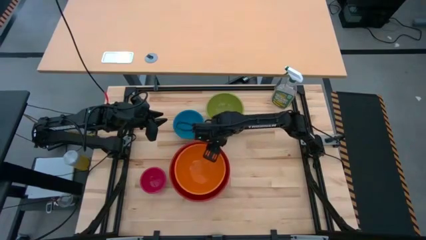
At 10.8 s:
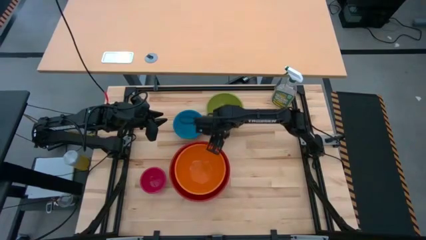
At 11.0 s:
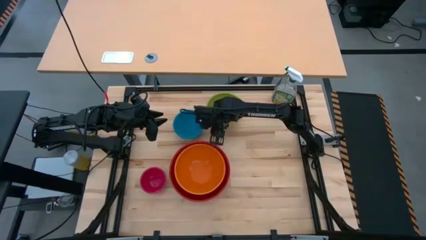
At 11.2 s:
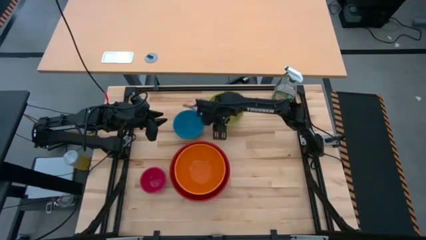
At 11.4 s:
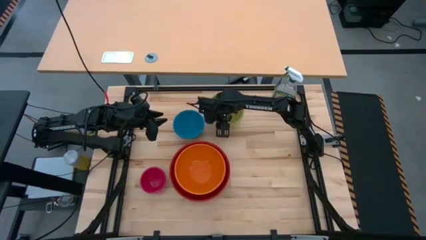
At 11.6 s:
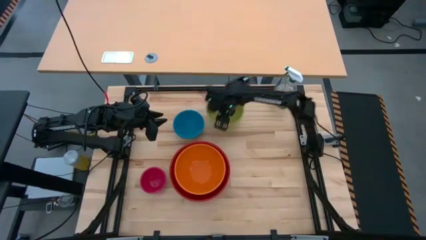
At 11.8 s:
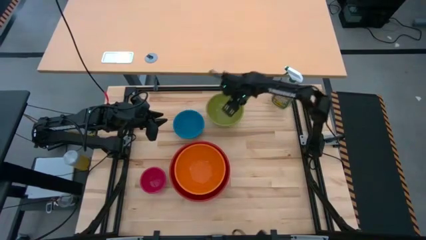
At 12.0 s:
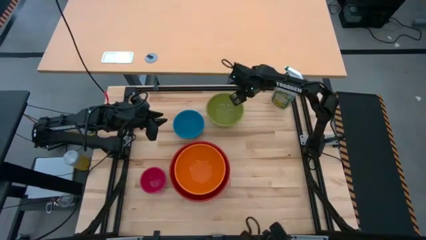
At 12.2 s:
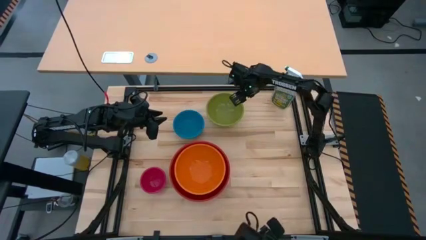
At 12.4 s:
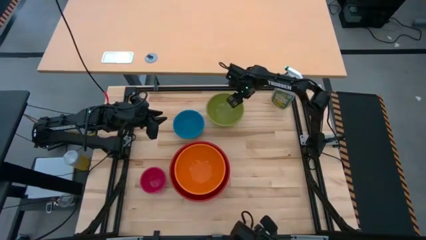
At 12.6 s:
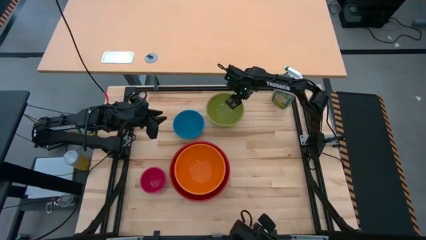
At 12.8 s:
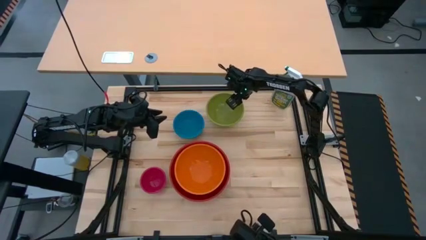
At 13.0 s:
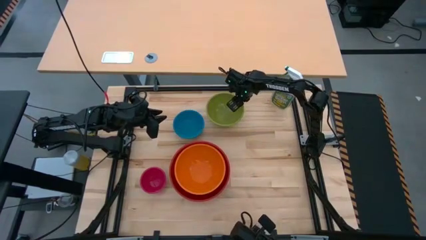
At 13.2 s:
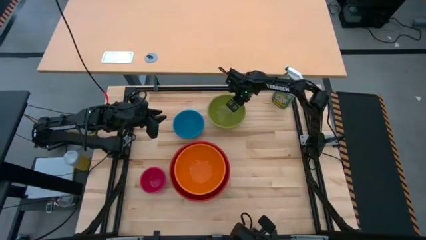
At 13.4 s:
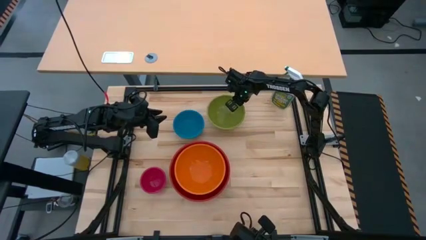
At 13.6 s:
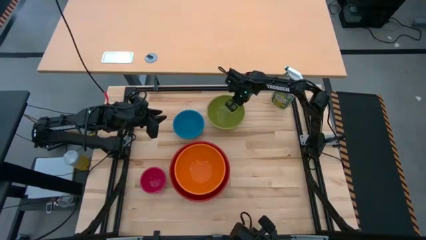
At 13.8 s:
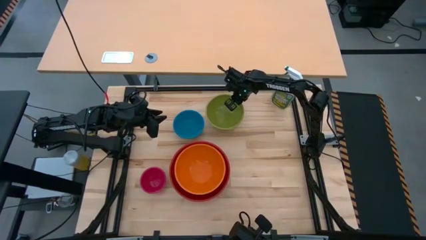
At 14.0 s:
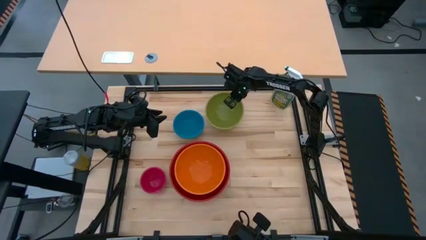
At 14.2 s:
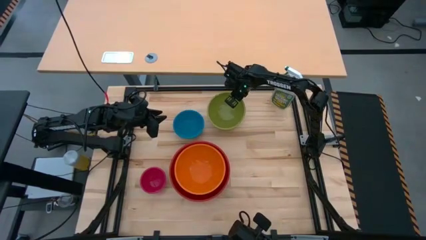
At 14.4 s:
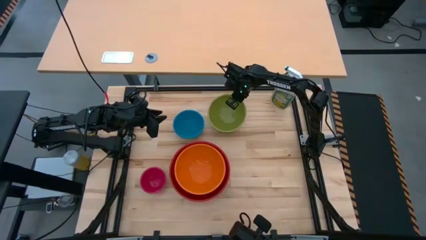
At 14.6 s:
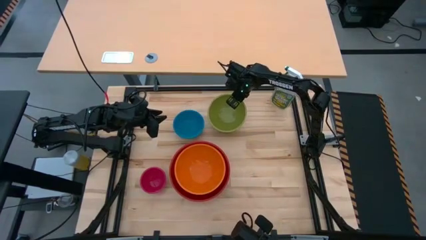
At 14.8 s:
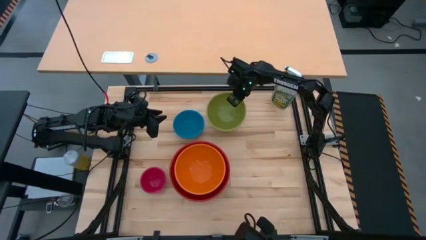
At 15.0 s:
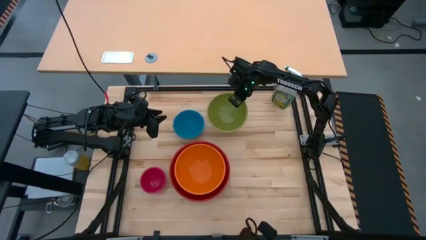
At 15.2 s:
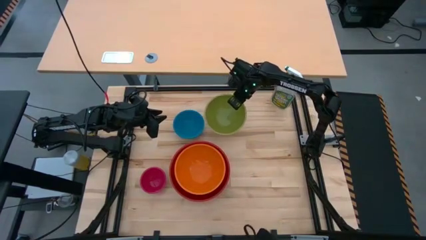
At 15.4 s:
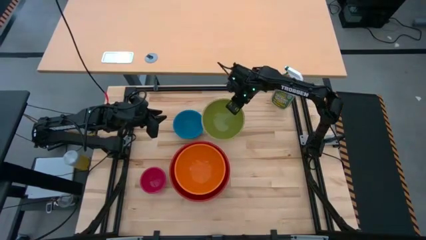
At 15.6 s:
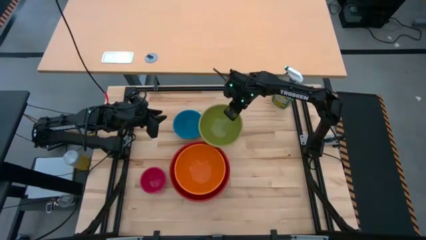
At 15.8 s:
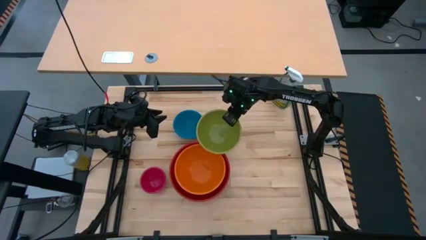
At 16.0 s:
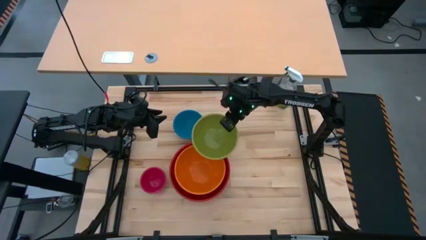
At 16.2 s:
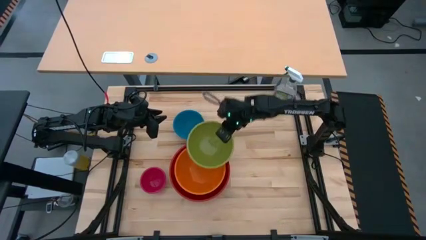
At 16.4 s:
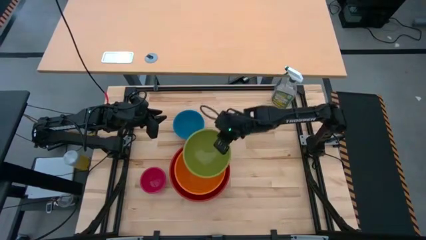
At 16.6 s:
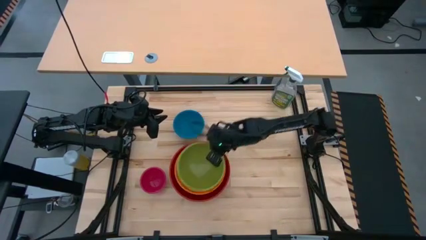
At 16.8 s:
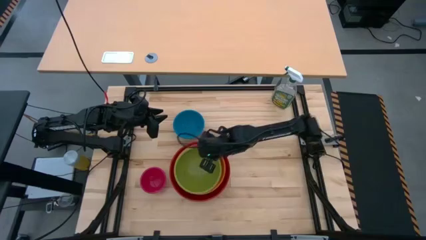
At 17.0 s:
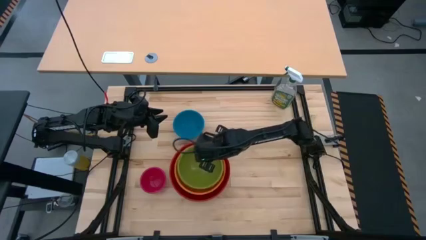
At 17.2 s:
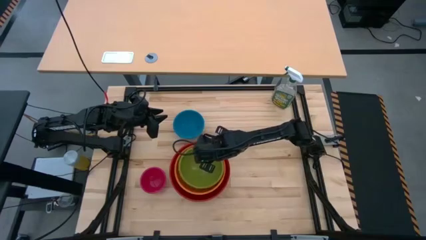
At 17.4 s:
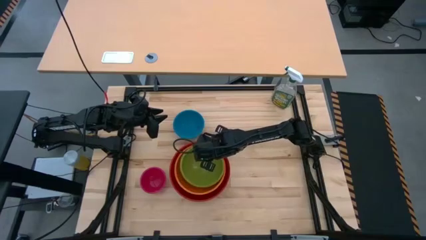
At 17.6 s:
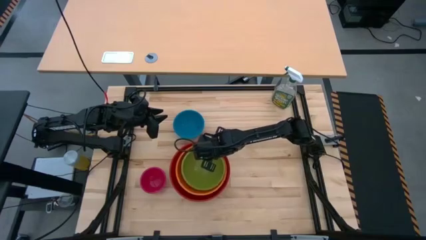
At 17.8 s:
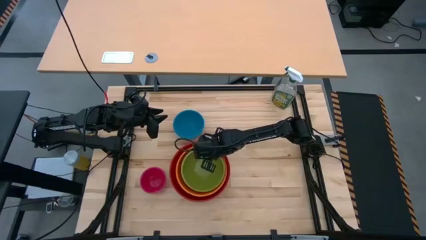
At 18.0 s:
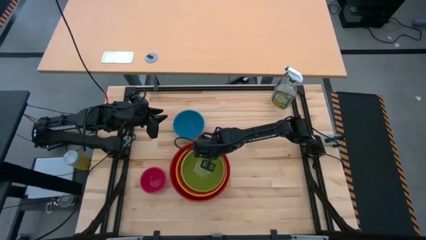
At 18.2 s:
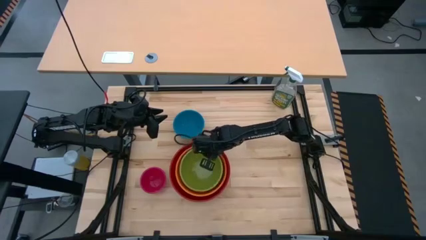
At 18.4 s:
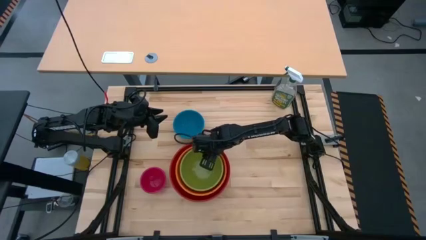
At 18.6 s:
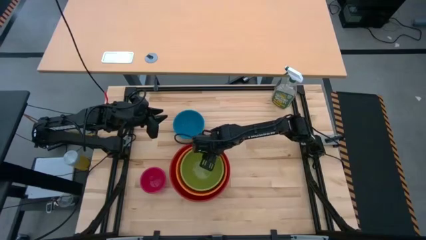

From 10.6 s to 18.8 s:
Stack the green bowl on top of the orange bowl

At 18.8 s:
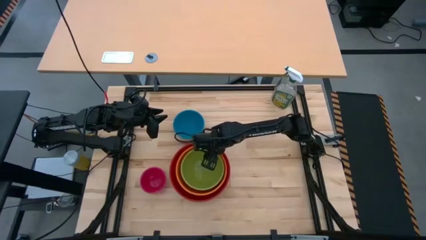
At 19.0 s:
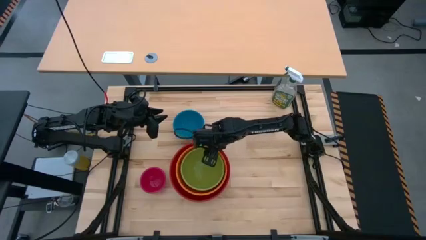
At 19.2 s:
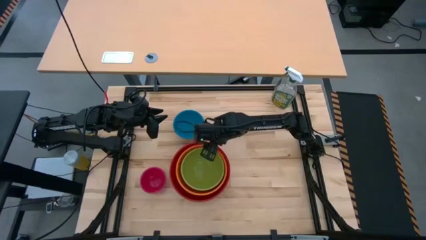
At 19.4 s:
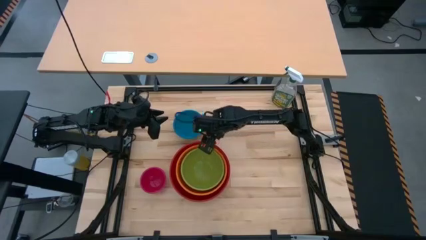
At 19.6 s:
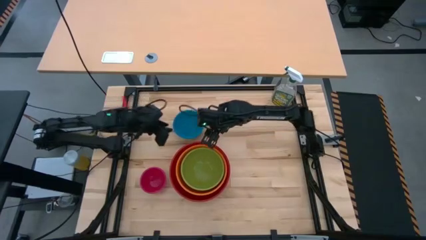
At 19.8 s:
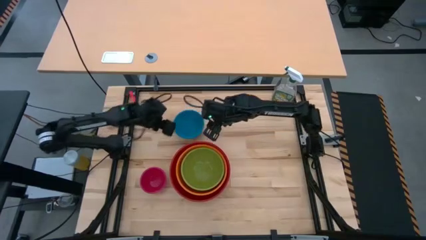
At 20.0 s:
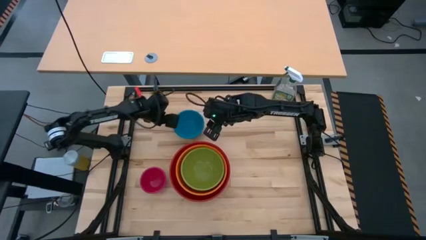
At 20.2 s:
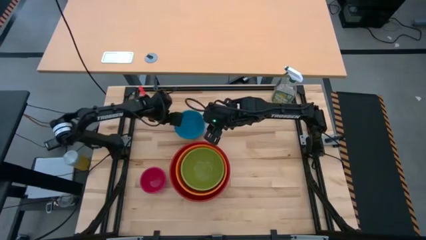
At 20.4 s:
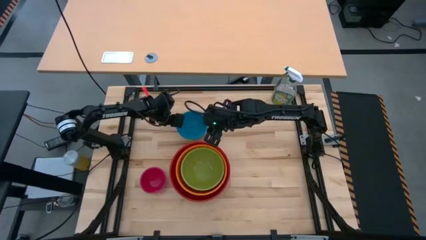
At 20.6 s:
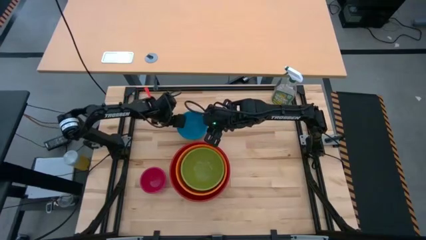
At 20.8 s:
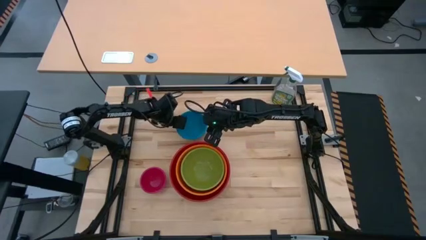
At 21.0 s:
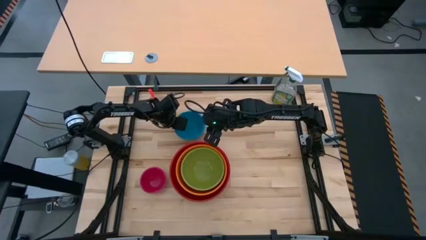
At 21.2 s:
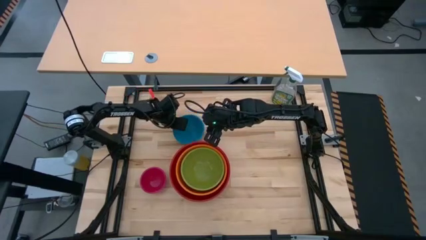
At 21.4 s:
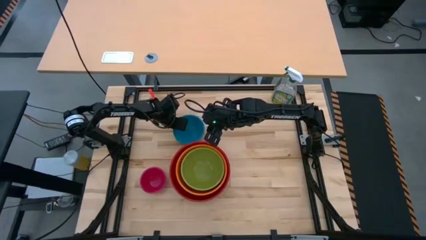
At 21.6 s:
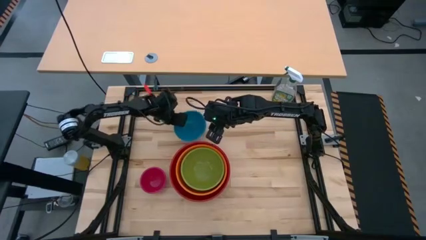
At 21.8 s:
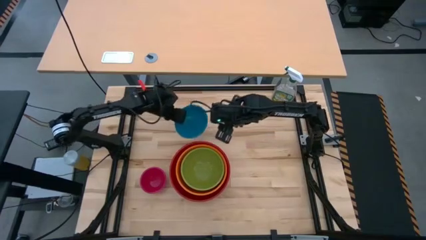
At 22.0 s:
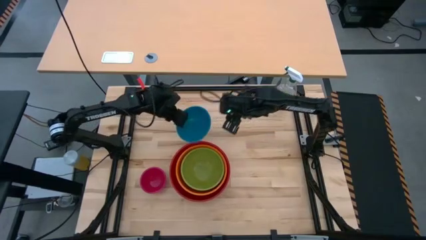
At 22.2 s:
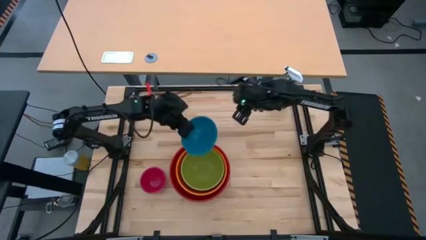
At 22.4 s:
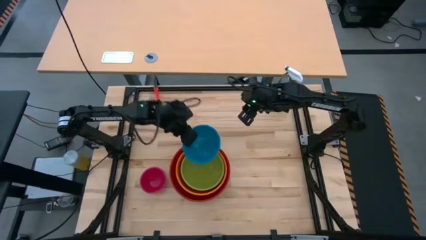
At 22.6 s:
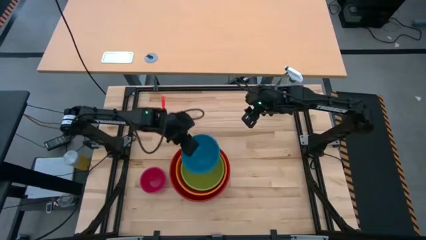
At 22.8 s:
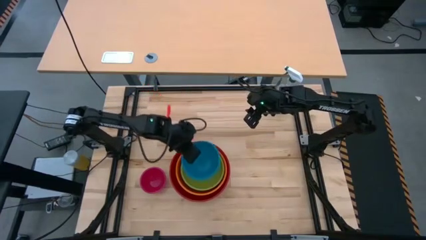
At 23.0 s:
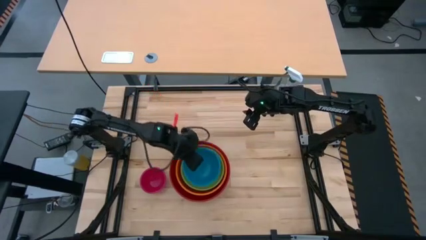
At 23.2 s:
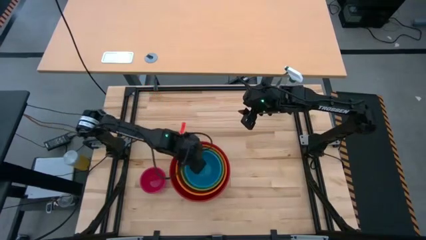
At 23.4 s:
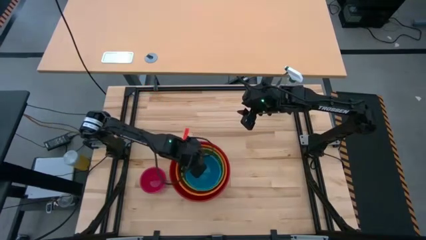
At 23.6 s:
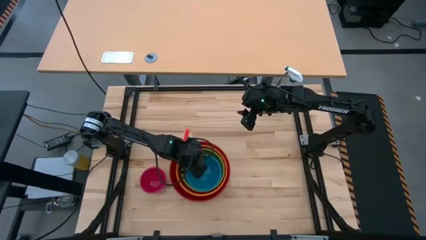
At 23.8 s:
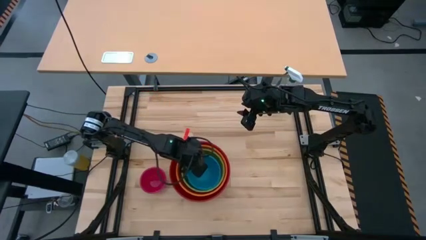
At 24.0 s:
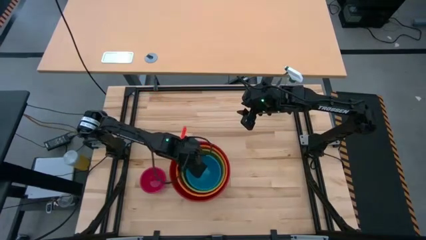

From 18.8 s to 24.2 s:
Stack the blue bowl on top of the green bowl
